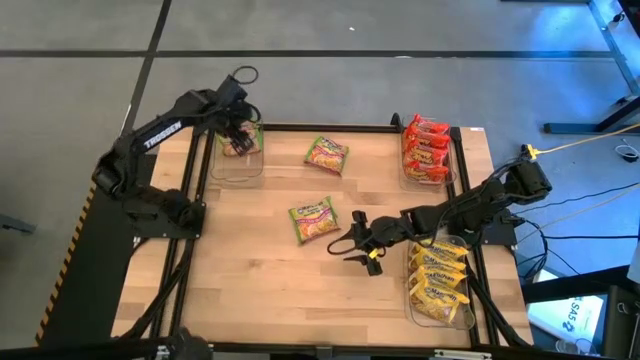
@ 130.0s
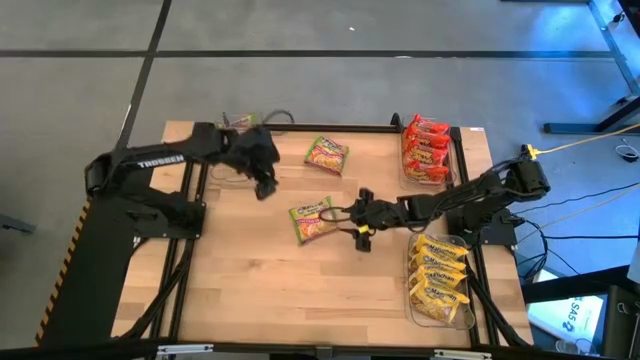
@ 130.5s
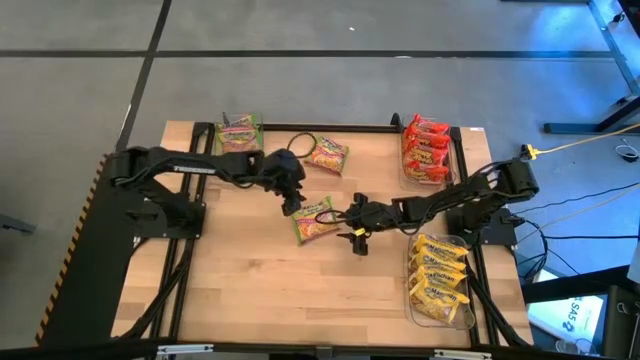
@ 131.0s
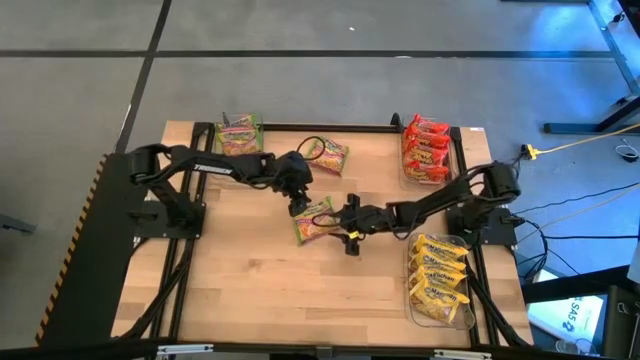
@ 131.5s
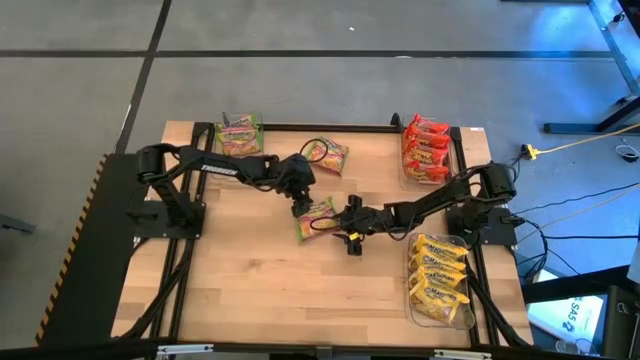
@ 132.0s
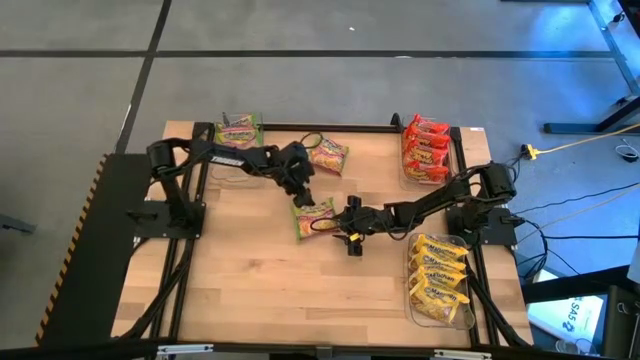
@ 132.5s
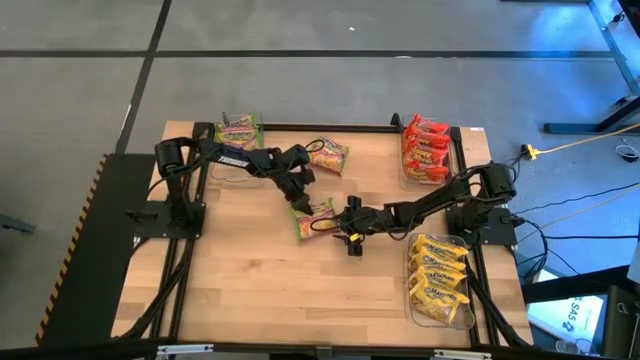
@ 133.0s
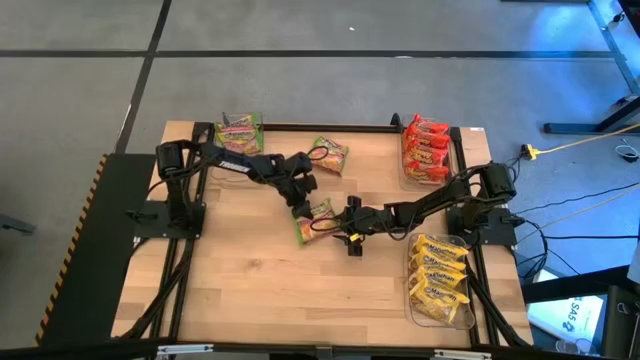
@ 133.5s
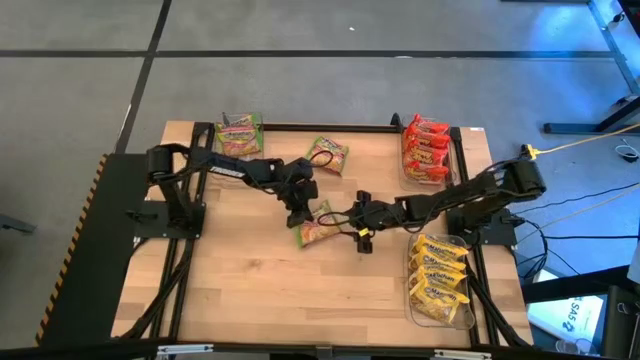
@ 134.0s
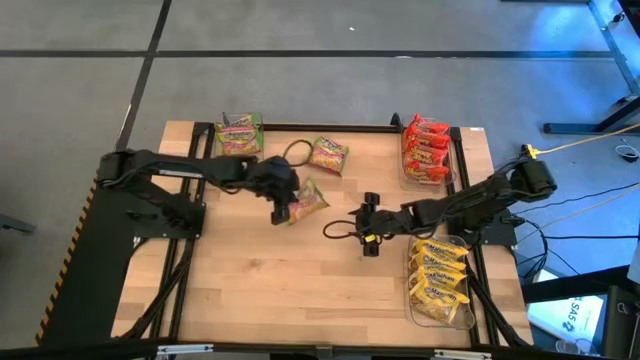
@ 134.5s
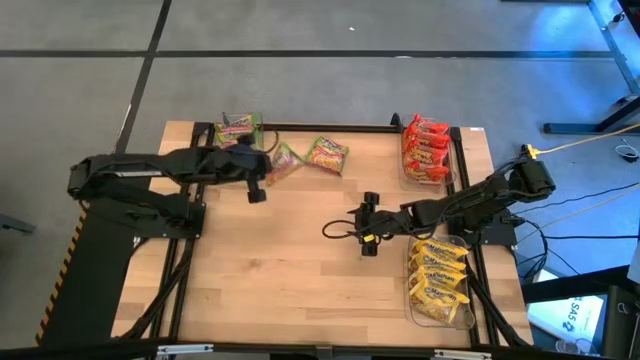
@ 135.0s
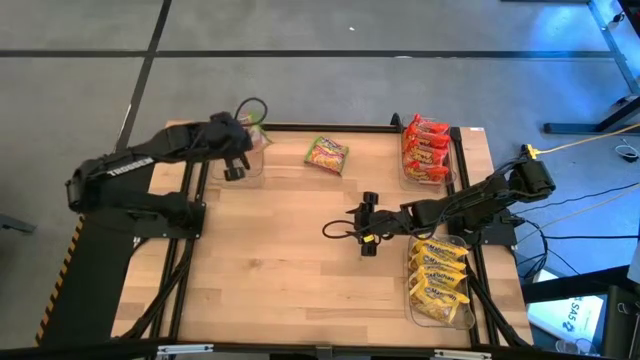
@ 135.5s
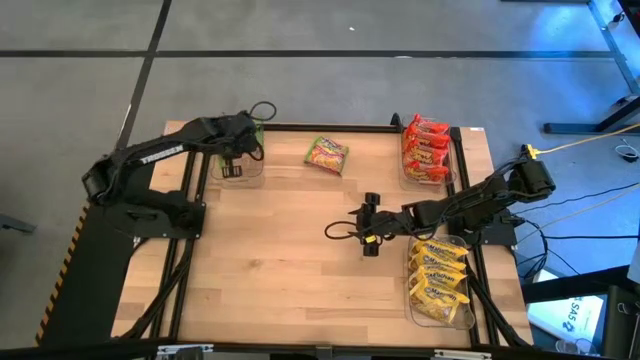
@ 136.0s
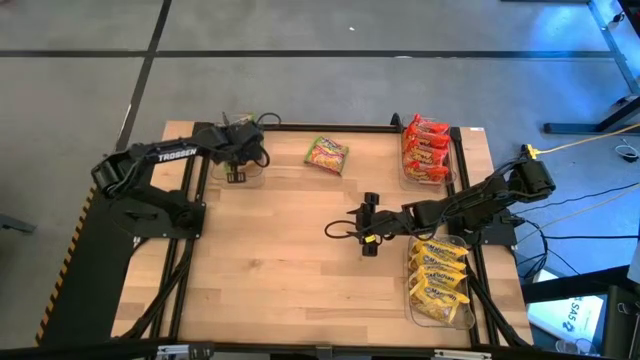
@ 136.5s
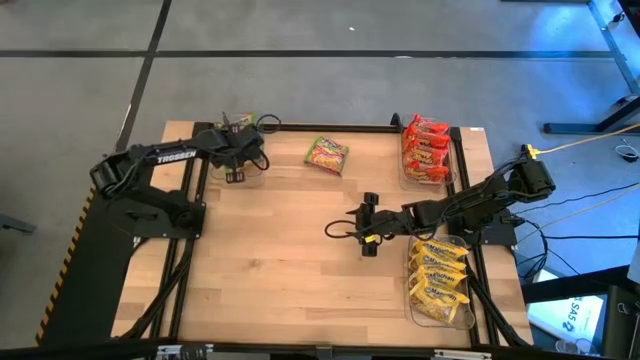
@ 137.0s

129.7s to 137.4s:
Task: Sort Maruchan noodles
Put the green noodle pack into the top left transparent bin

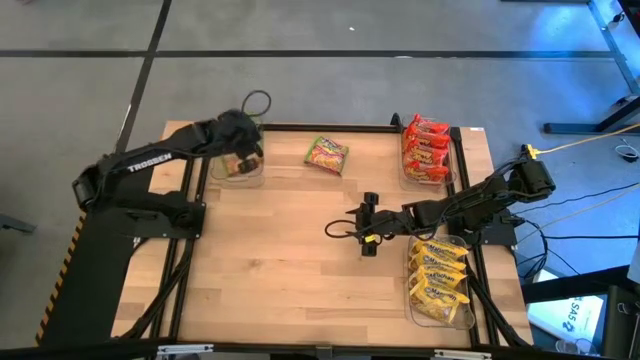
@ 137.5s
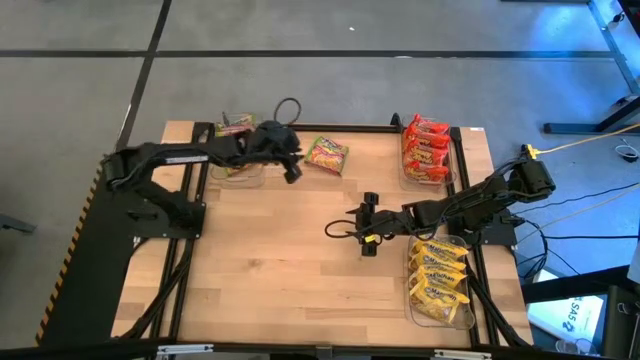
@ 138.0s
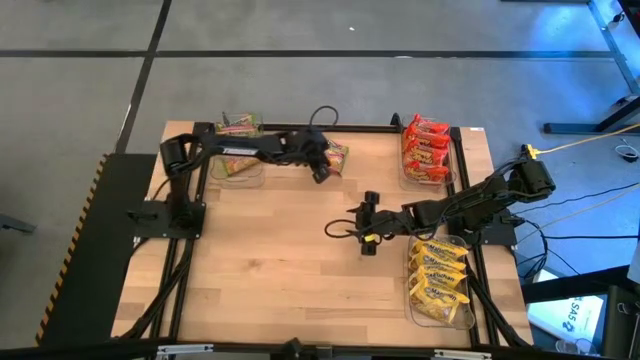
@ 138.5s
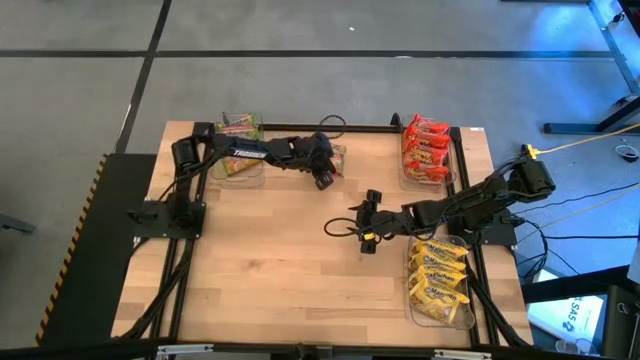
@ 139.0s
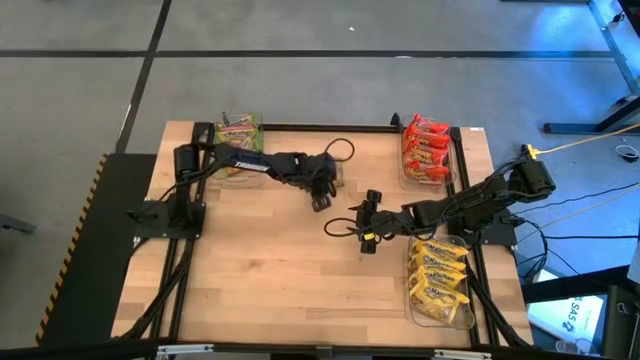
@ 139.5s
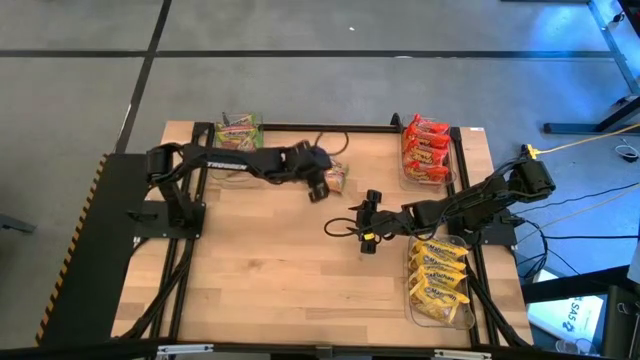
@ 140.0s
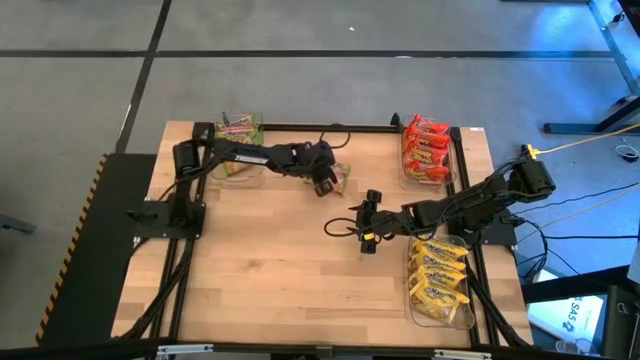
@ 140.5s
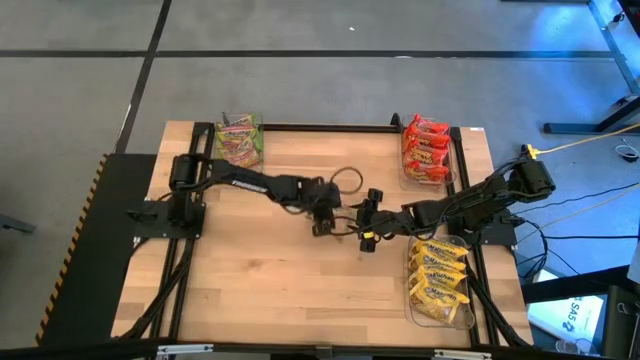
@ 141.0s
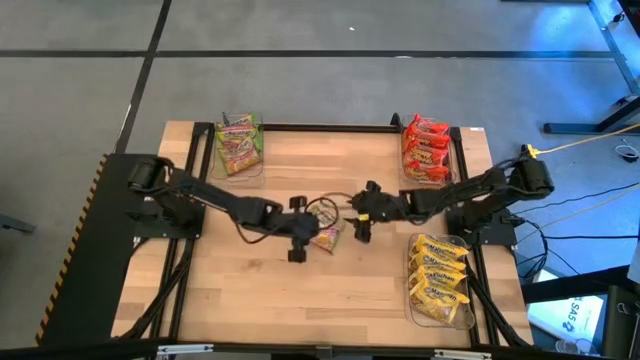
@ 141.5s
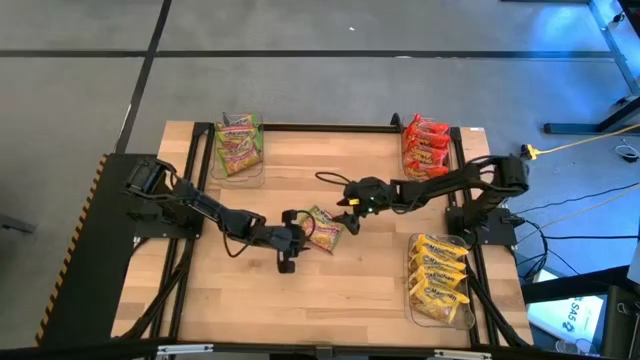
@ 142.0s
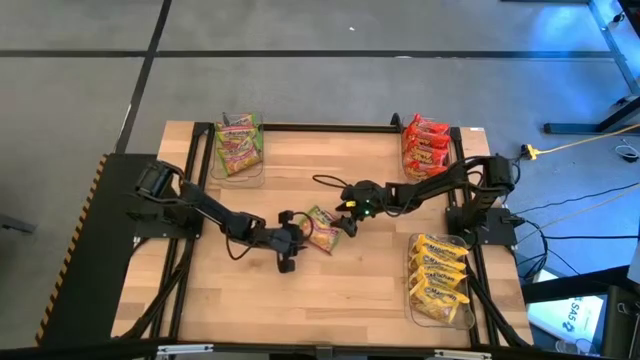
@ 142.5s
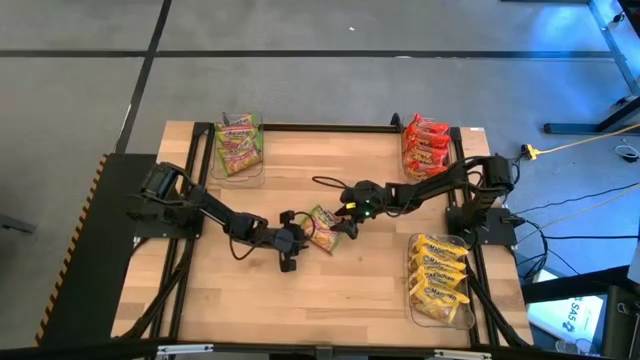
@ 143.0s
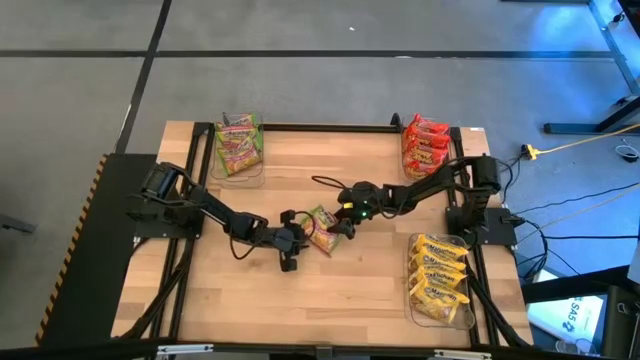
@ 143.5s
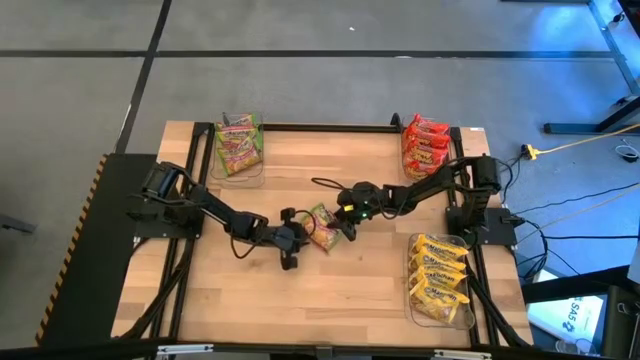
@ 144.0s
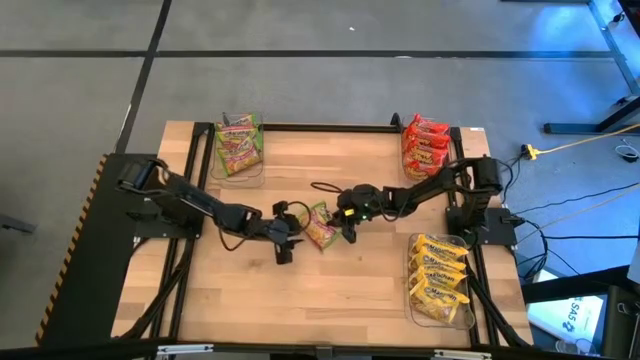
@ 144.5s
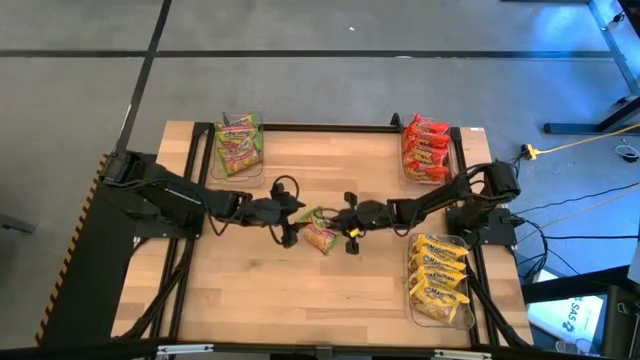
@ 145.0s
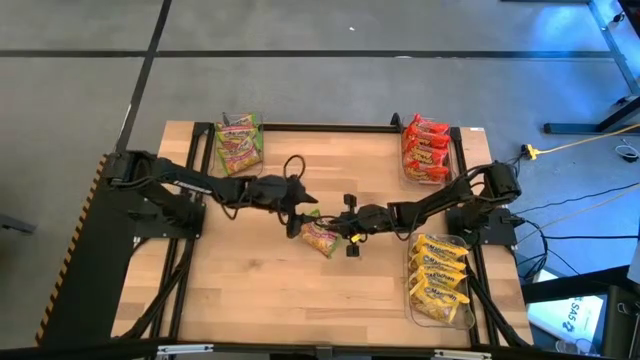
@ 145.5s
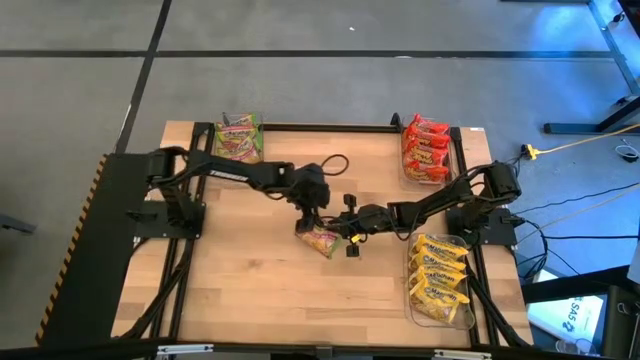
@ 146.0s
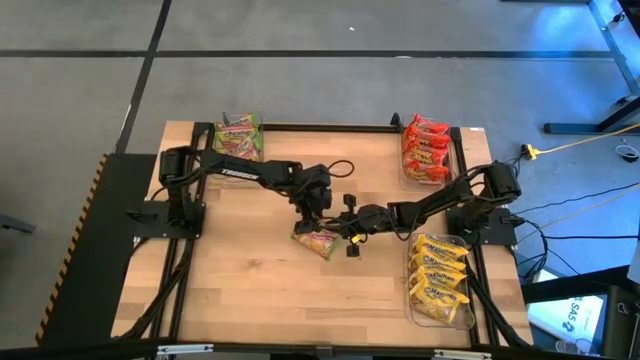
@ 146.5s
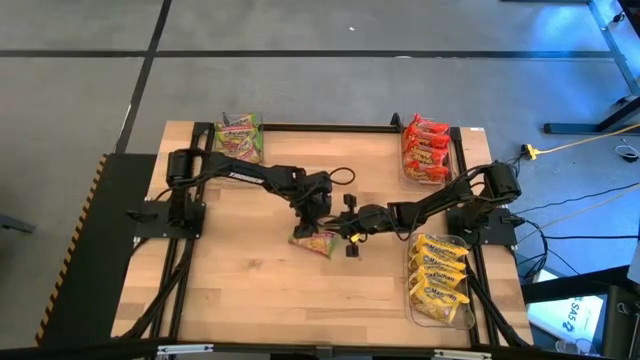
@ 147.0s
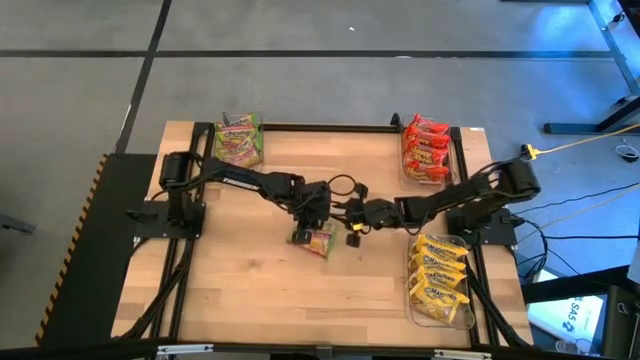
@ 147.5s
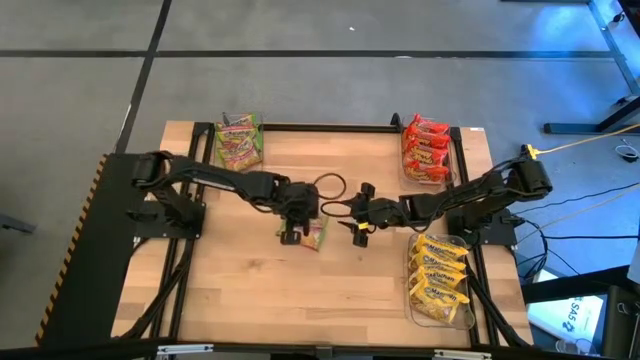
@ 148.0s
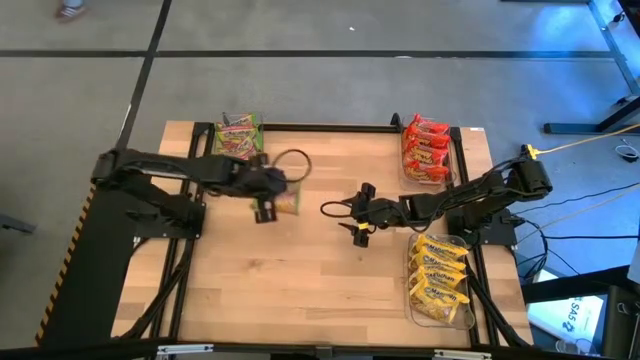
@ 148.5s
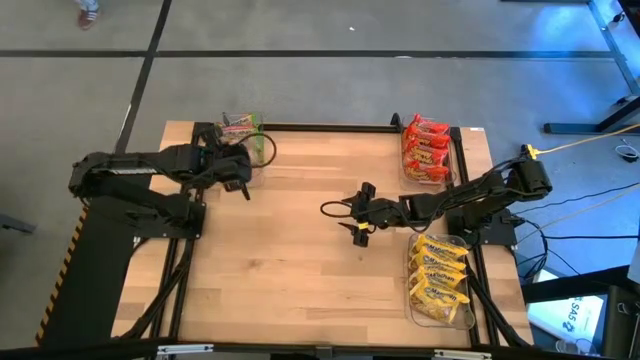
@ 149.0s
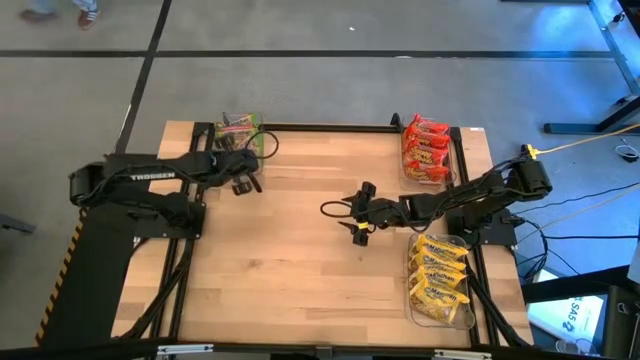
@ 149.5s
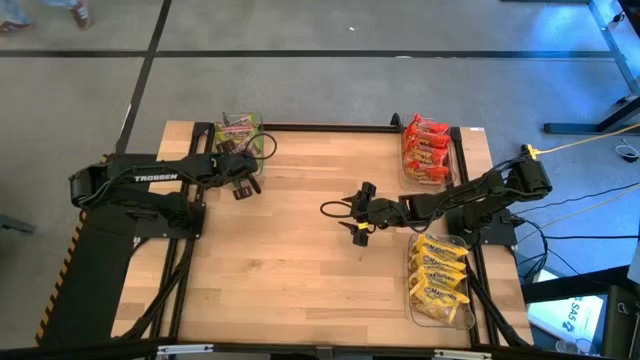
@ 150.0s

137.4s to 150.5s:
Put the green noodle pack into the top left transparent bin
